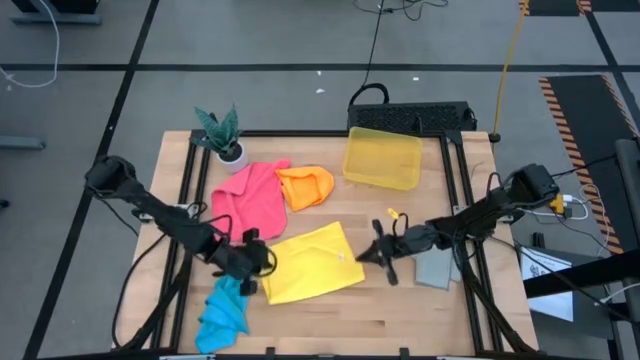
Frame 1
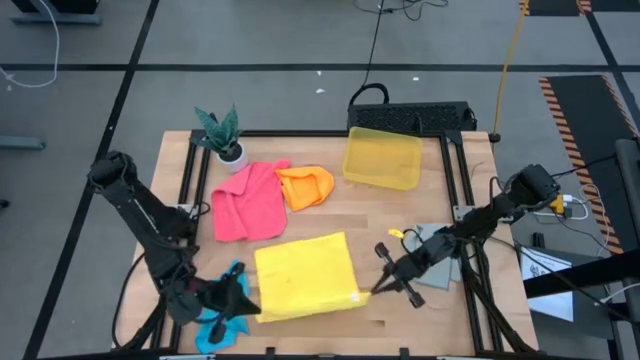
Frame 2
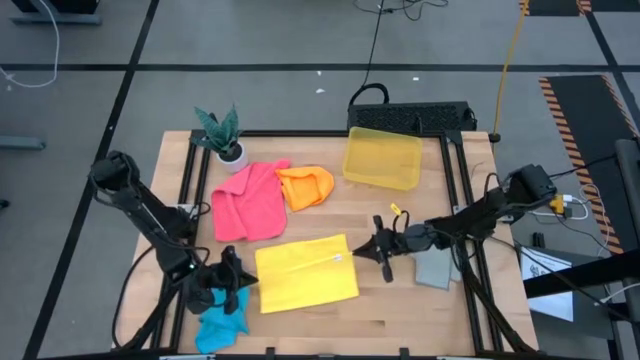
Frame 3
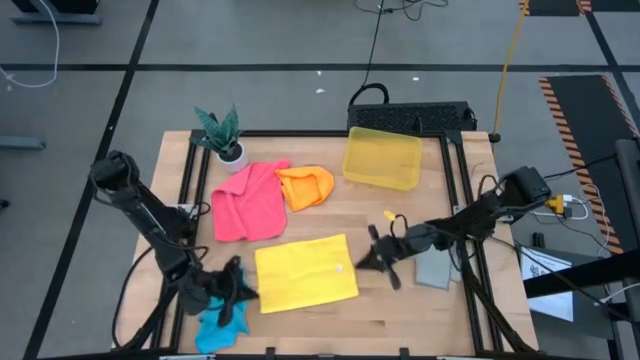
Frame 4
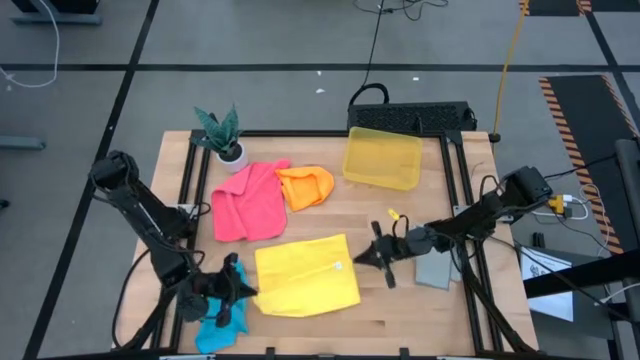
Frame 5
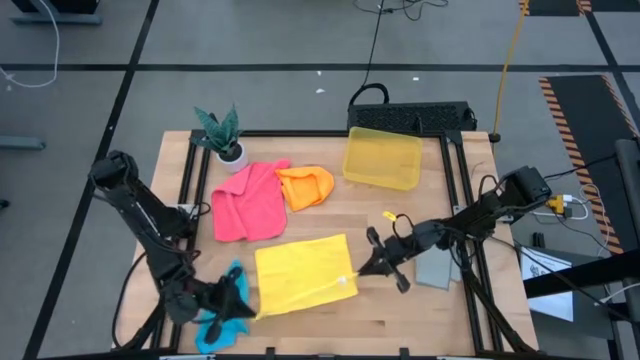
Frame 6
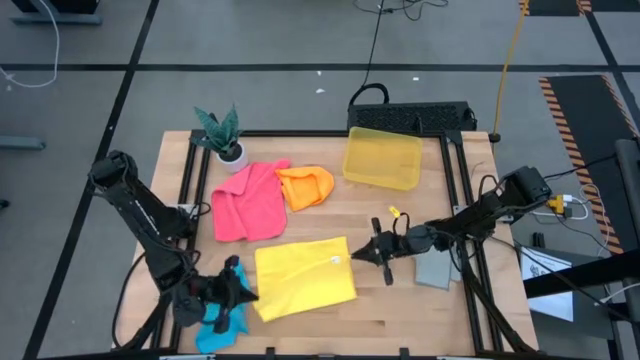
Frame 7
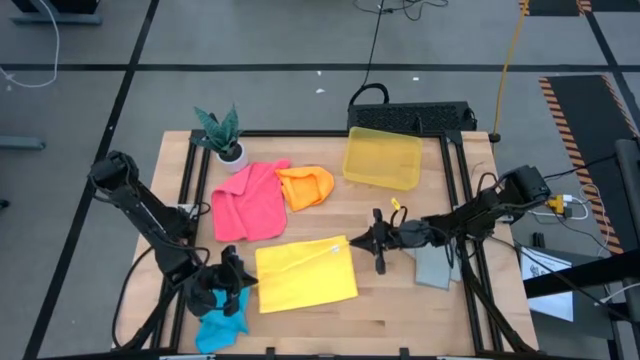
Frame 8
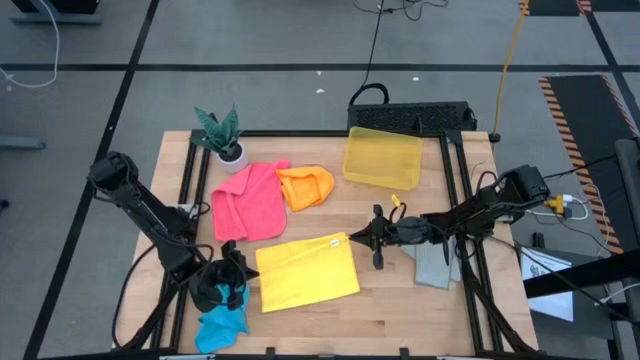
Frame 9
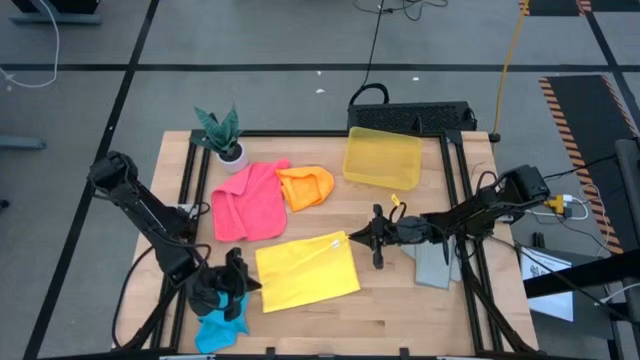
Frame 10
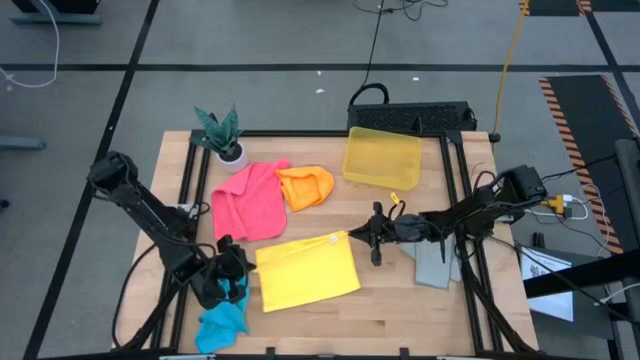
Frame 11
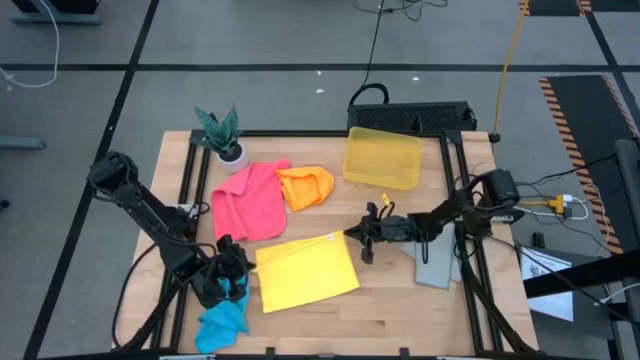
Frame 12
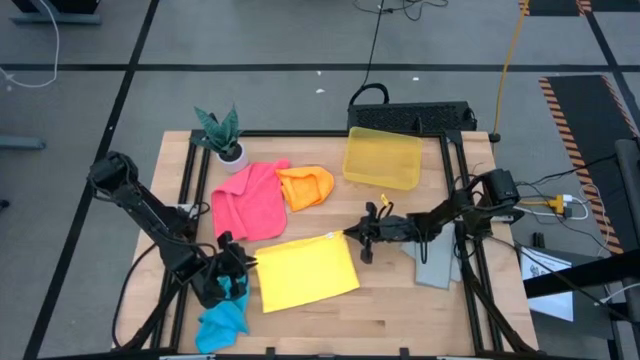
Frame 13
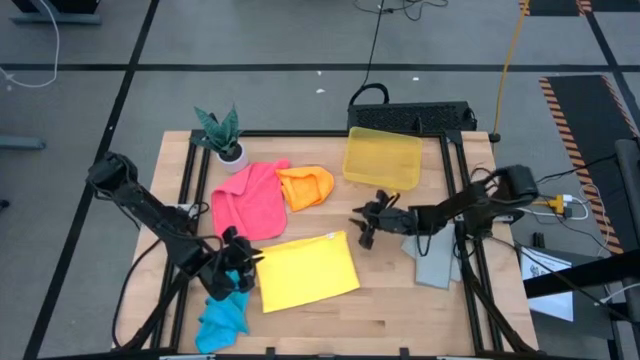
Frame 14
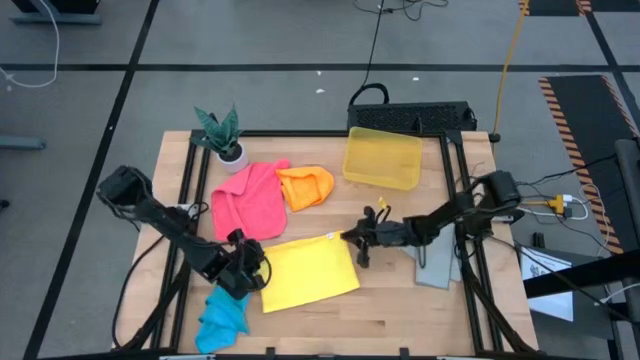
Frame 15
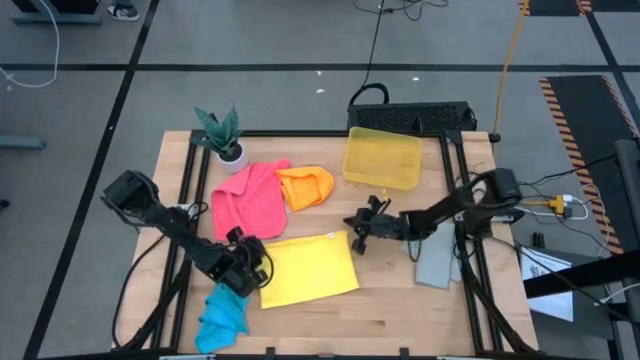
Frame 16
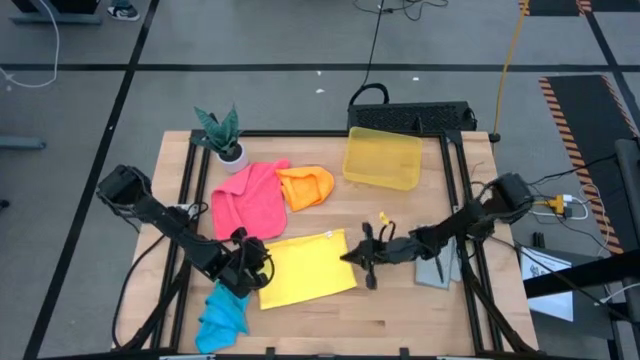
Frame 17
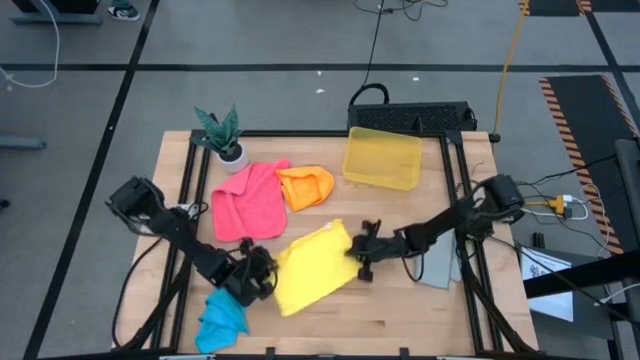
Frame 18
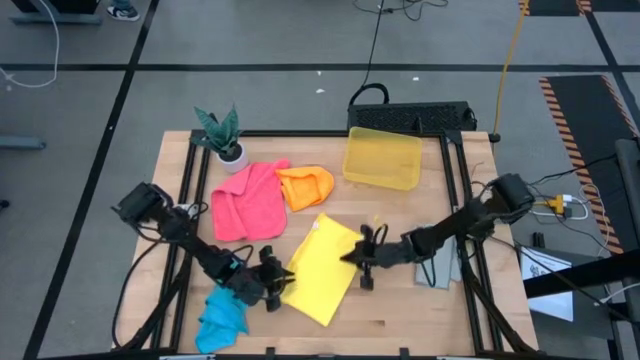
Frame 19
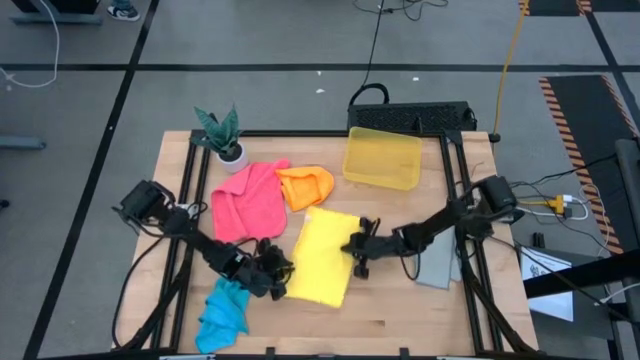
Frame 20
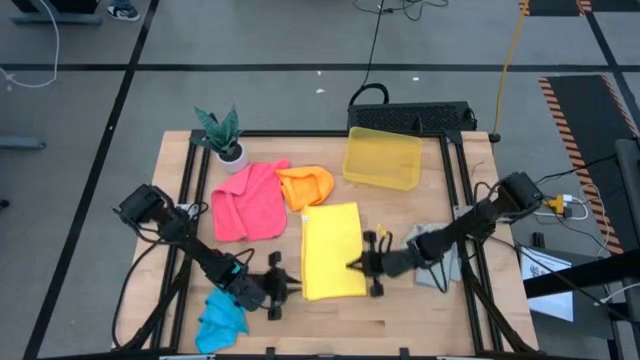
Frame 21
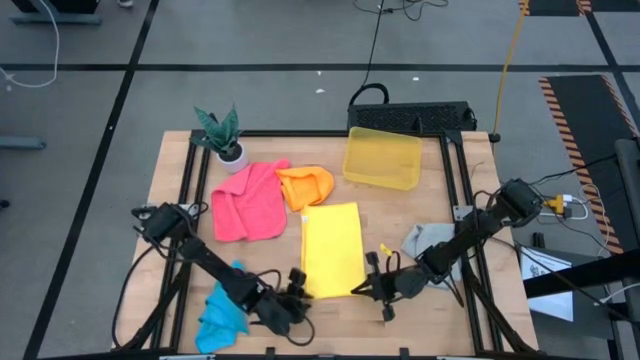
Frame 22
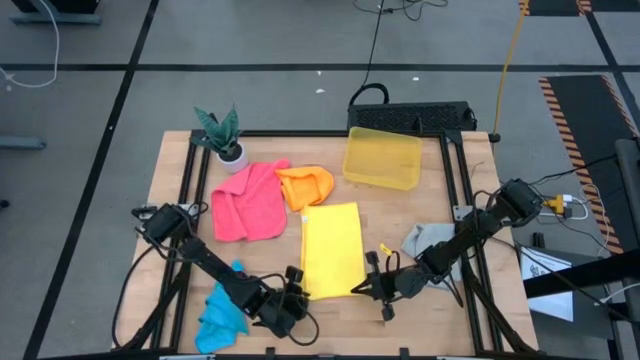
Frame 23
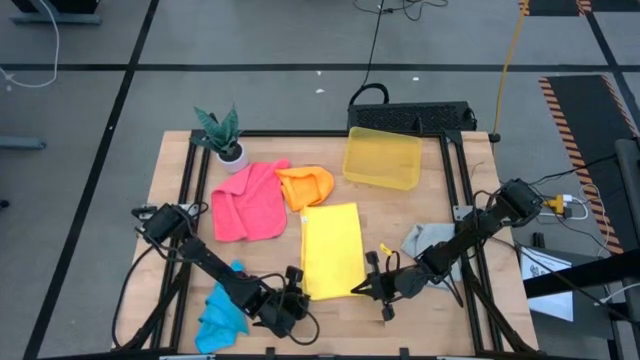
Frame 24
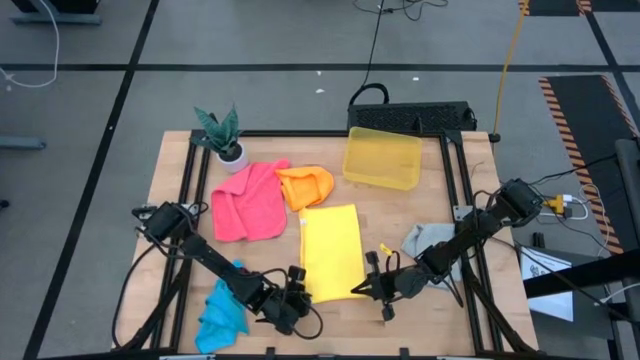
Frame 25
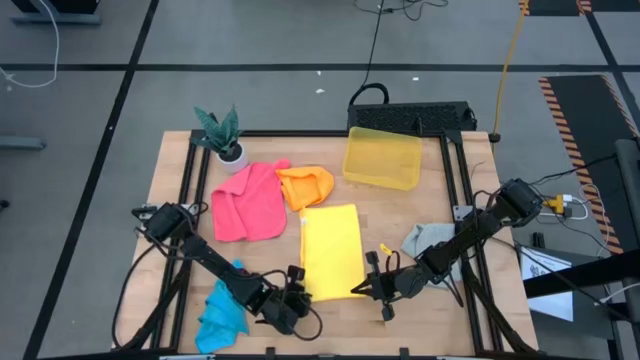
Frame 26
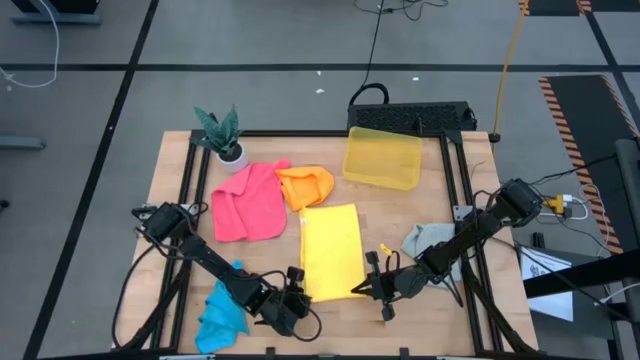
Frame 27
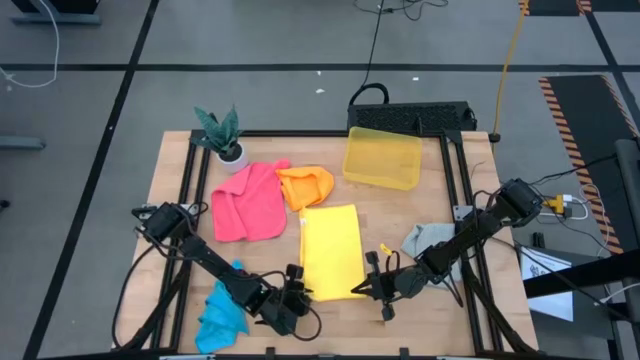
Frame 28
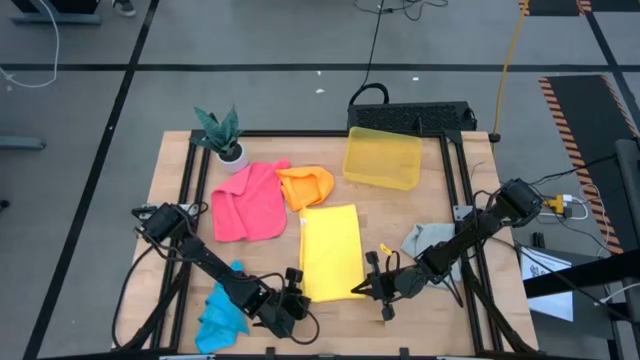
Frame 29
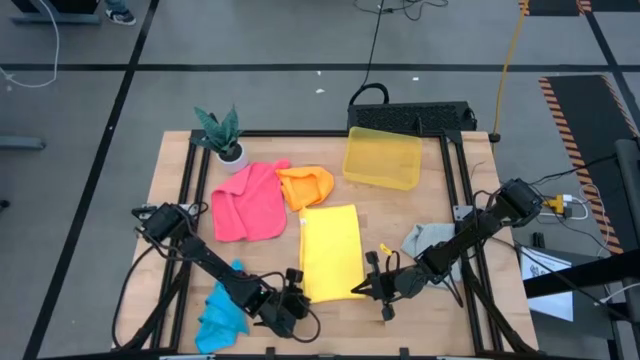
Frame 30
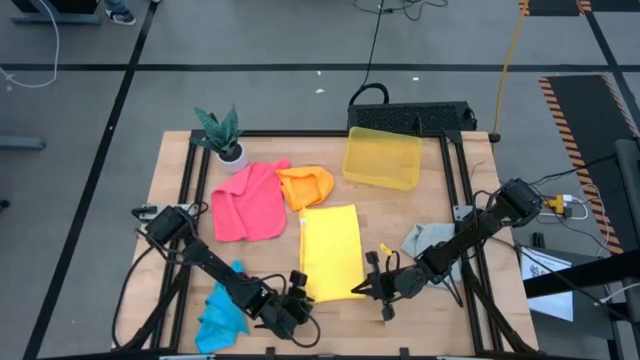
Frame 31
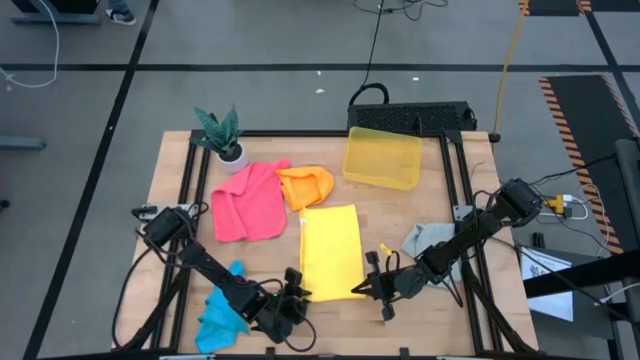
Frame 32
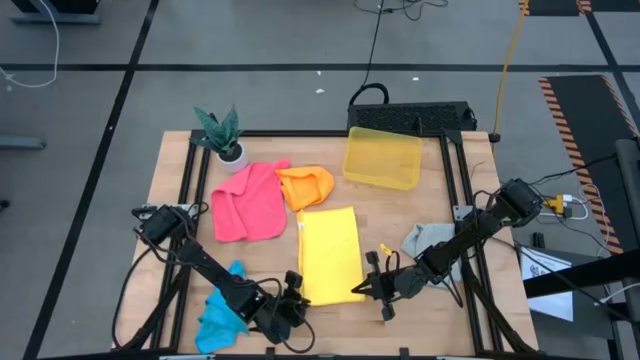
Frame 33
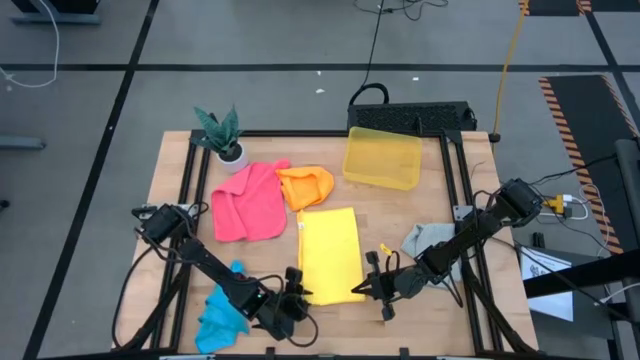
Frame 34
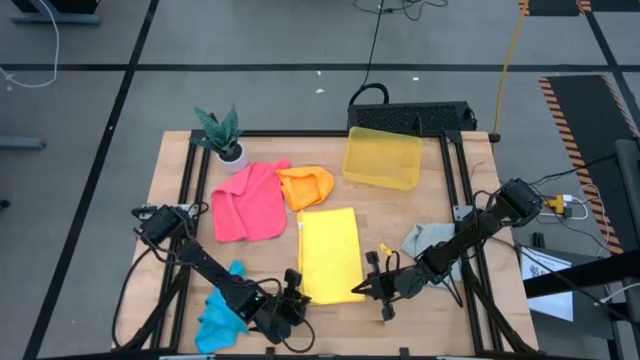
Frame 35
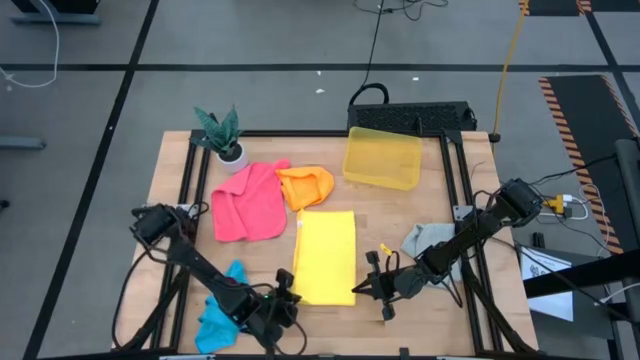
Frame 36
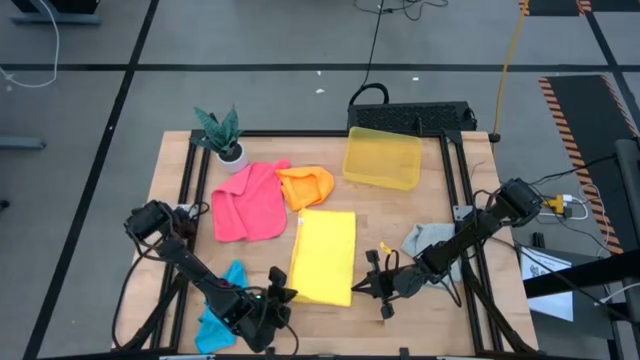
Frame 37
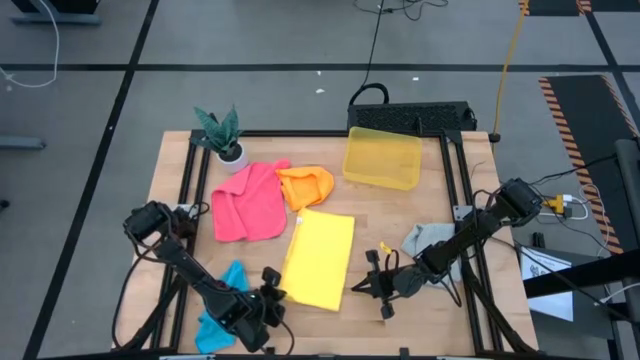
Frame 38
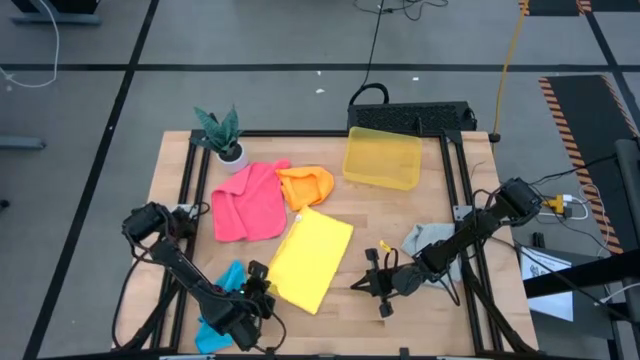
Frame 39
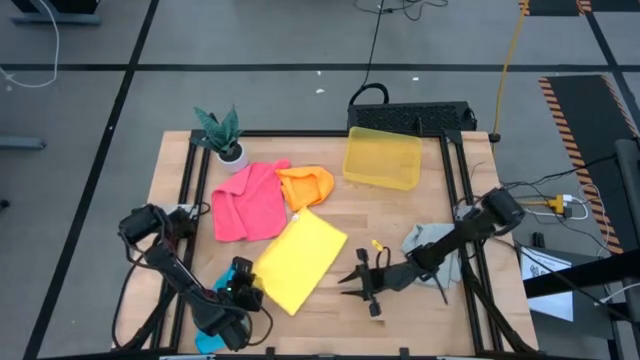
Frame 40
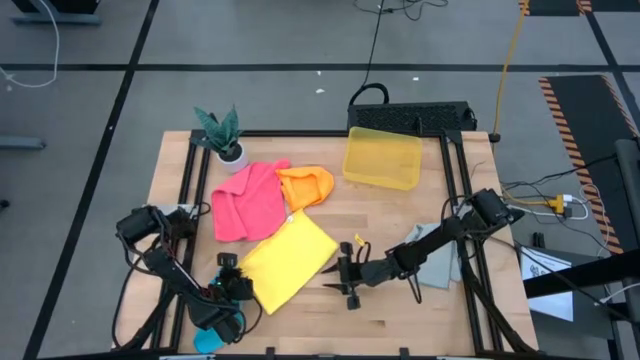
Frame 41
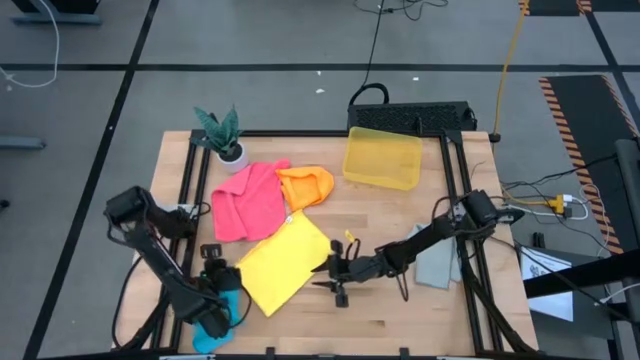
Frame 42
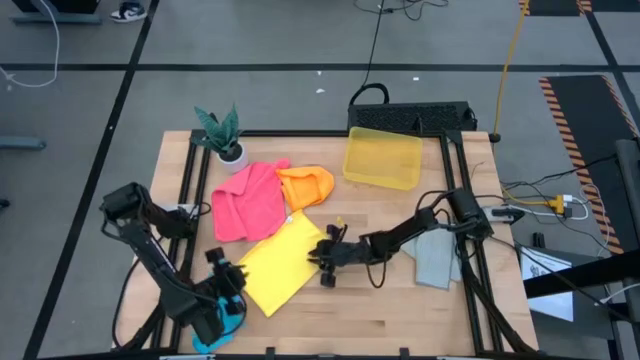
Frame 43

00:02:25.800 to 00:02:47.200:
Task: Fold microfiber towels
Fold the yellow kitchen towel
